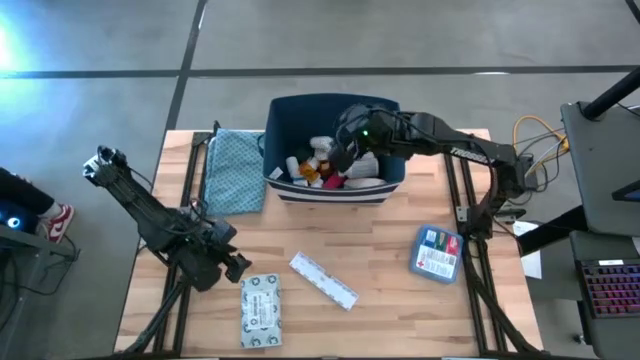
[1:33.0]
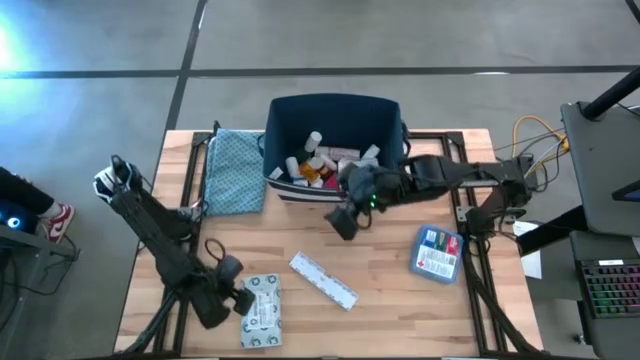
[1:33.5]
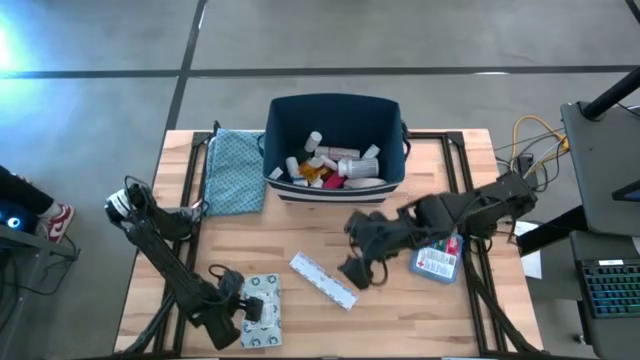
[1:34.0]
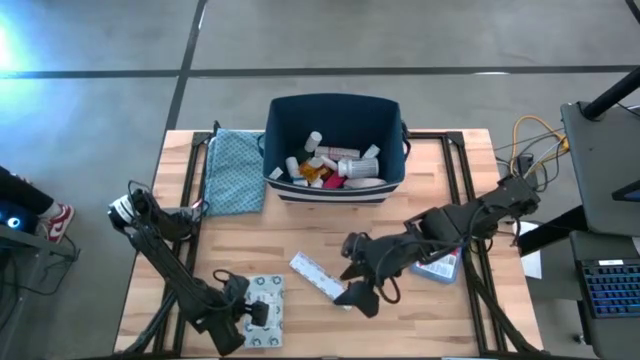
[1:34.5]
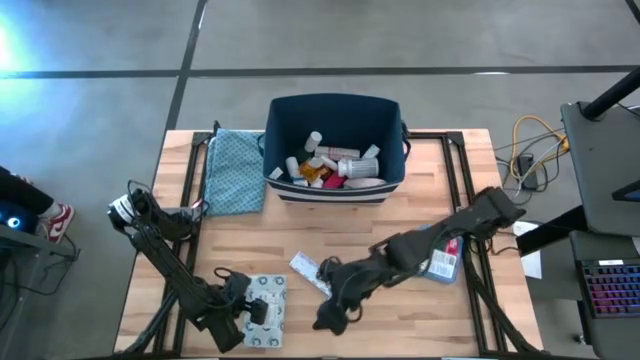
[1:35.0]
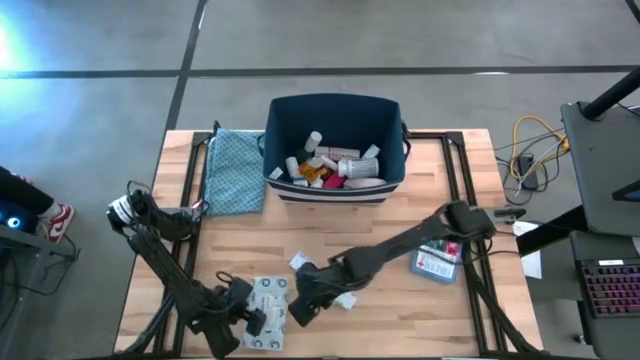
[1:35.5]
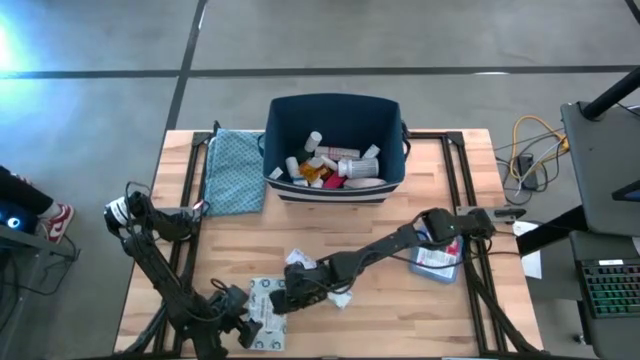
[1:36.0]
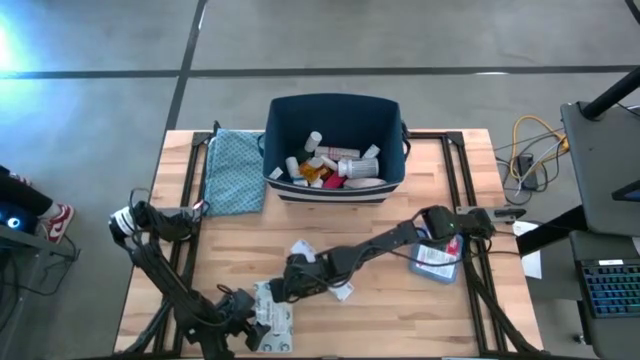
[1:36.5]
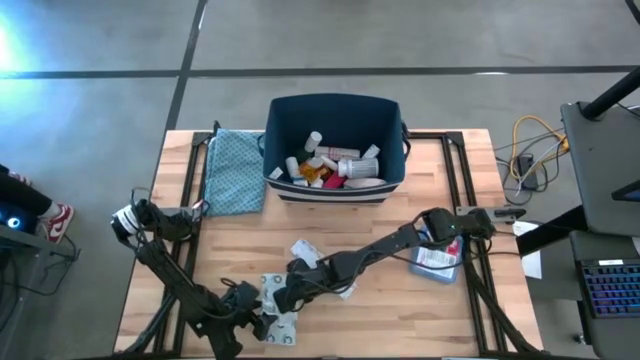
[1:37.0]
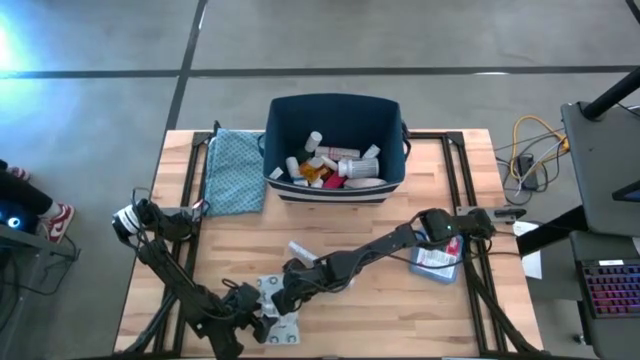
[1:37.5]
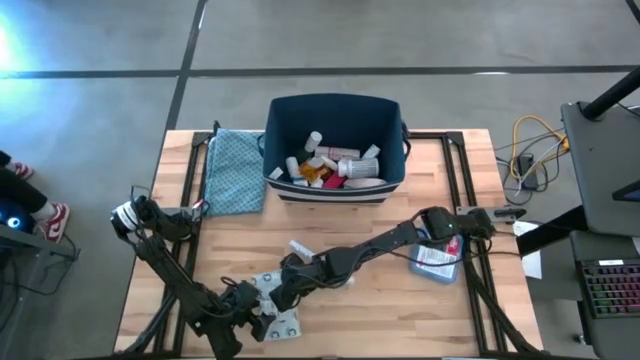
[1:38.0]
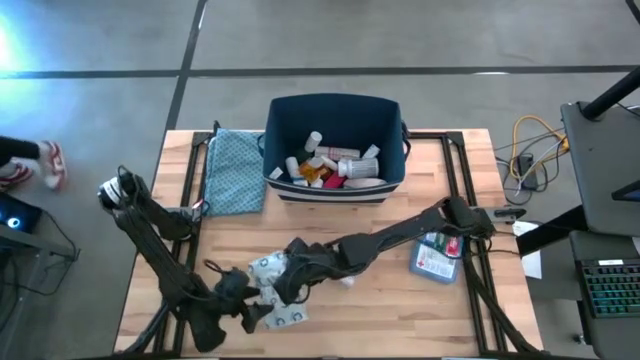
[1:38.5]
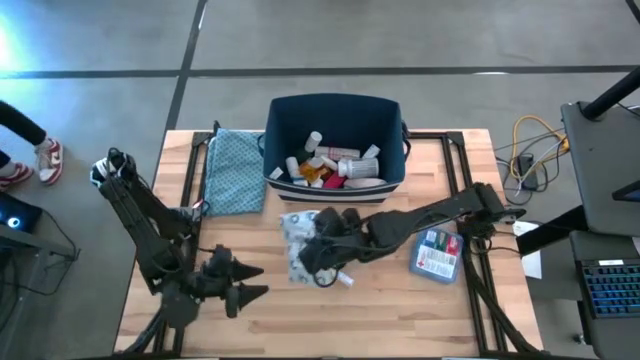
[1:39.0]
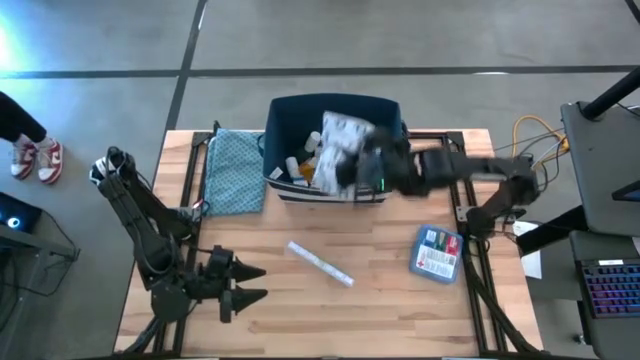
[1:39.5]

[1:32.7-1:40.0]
Task: Pick & place medical supplies in basket/bin
Put the mailer bag into the bin

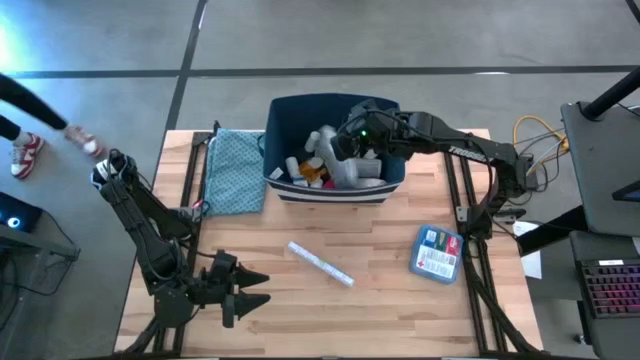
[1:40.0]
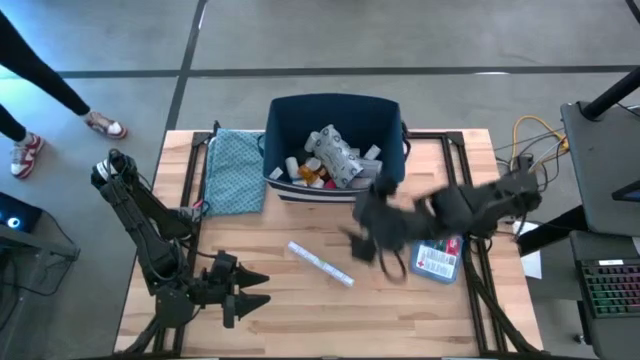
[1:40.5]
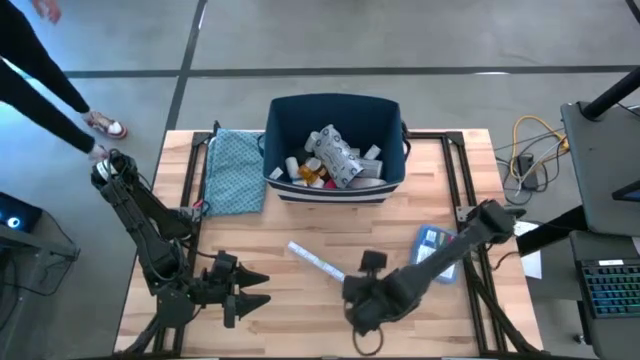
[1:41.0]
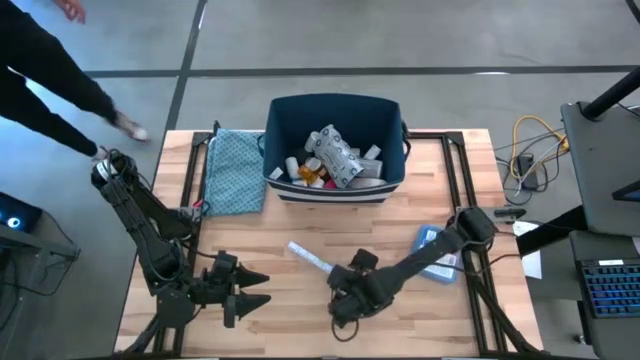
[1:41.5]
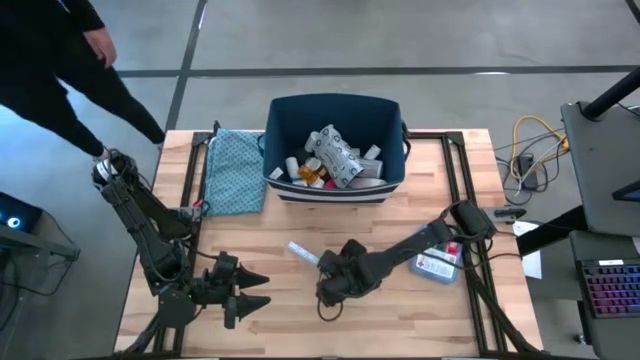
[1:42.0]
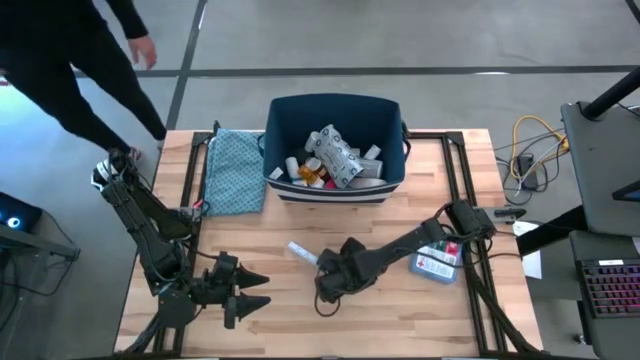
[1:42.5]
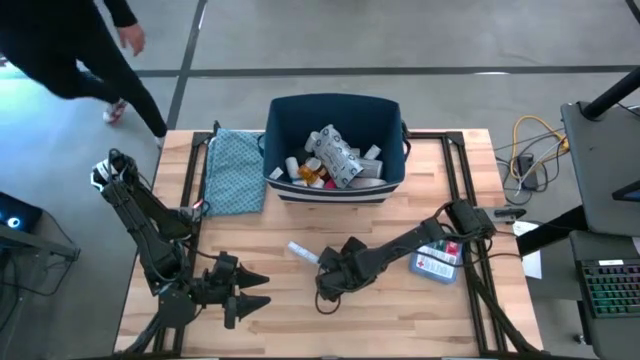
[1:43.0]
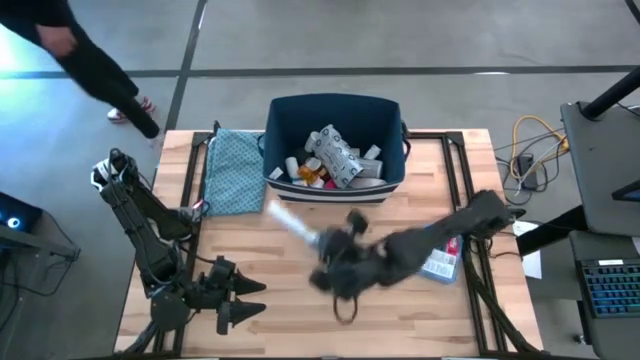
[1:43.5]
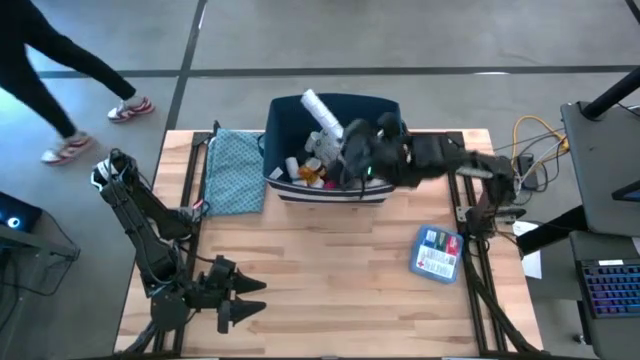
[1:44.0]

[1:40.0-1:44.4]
Put the medicine organizer into the bin

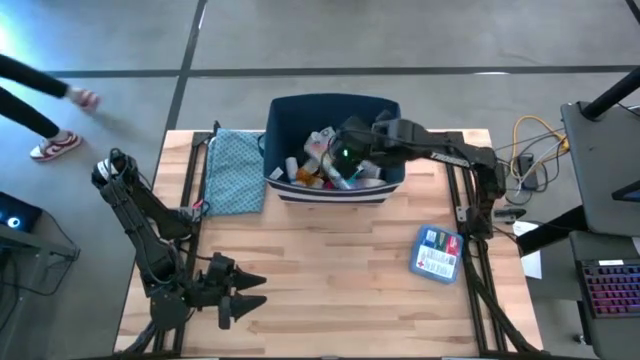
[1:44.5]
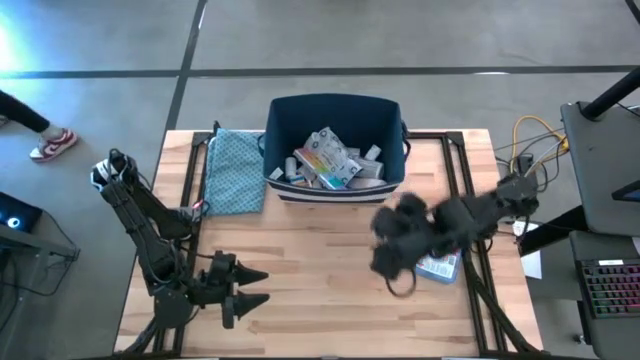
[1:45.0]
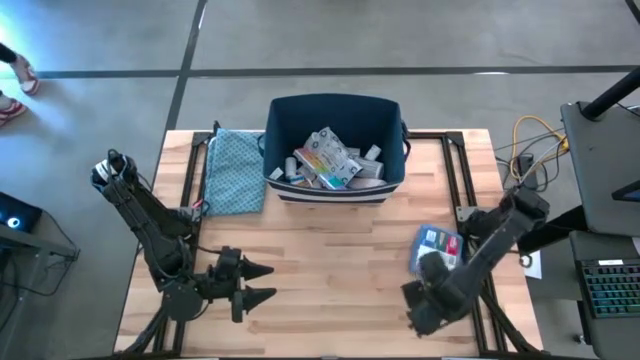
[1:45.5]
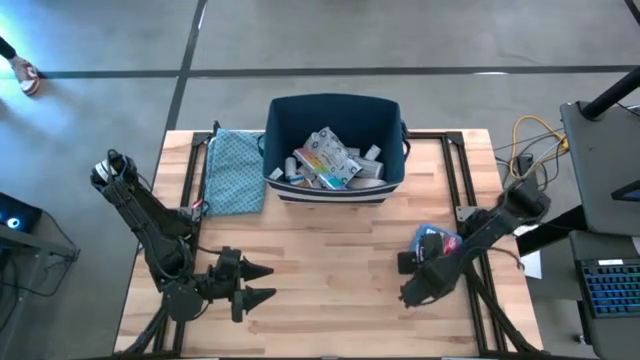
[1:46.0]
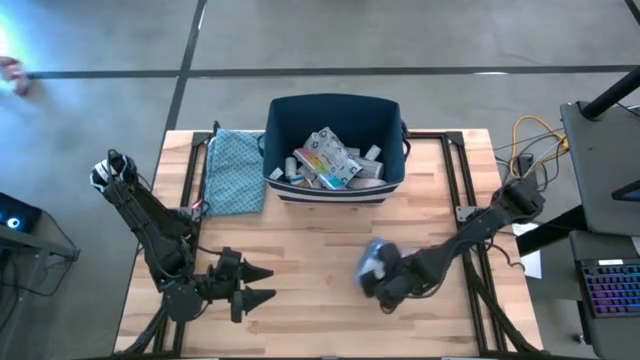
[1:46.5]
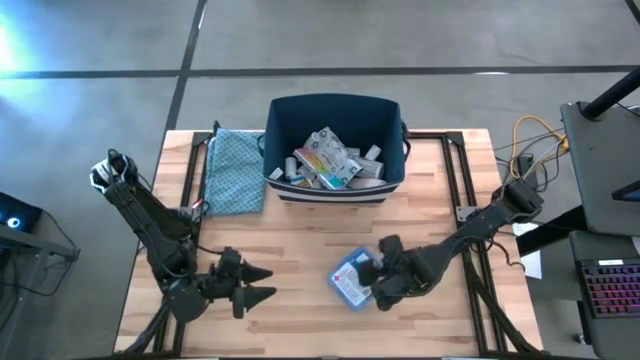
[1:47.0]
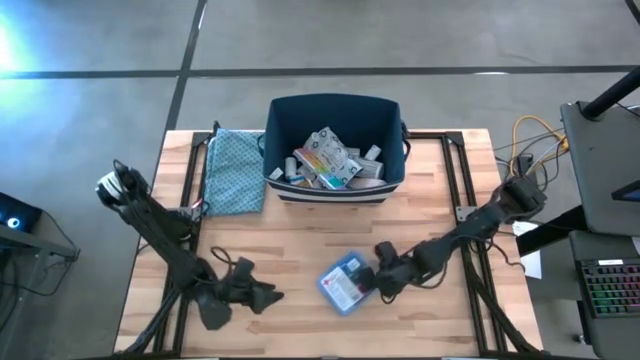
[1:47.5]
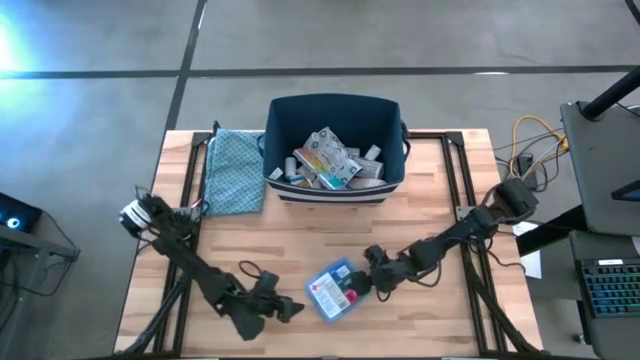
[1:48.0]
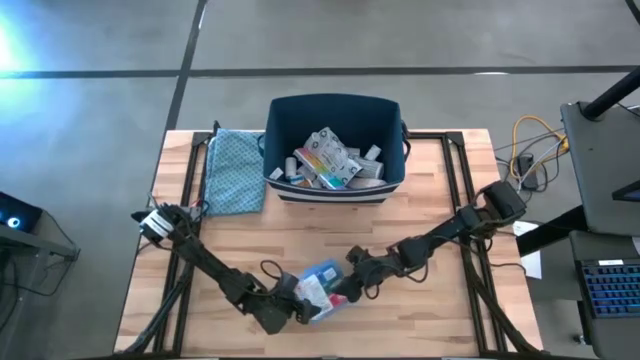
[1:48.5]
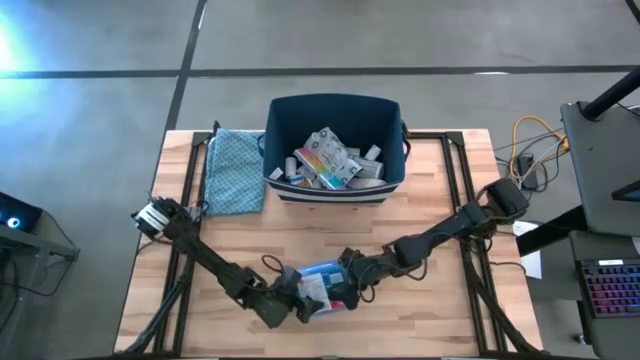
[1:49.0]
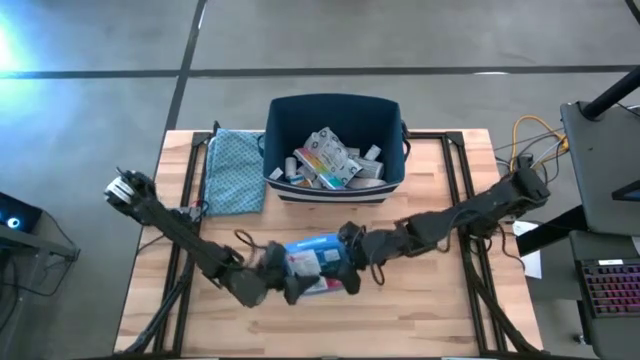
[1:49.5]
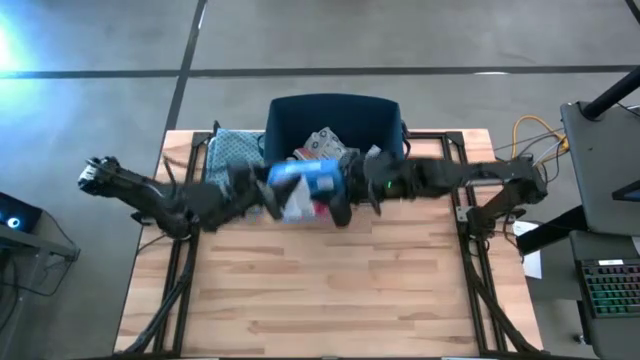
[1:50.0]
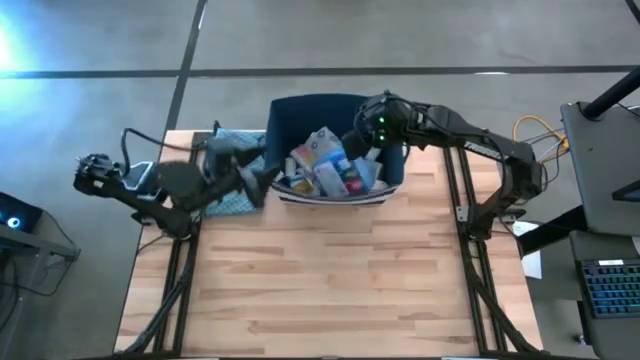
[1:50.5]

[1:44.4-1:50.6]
Put the blue first aid kit into the bin

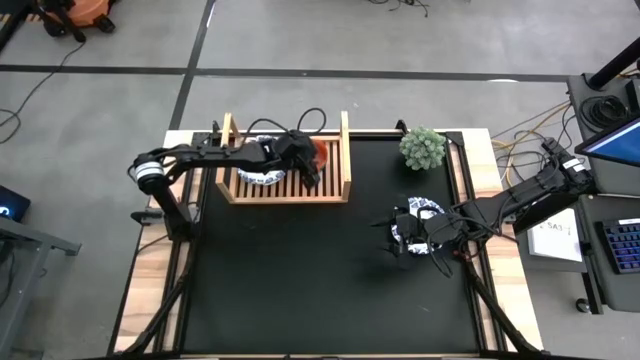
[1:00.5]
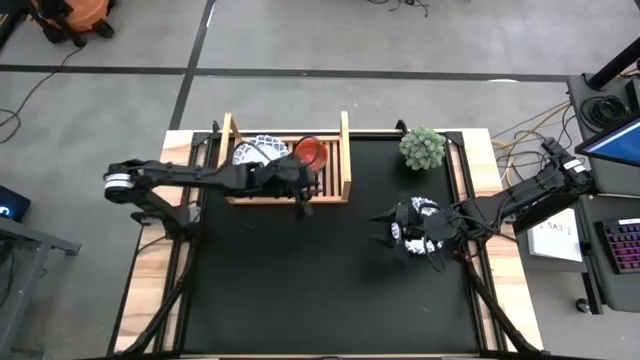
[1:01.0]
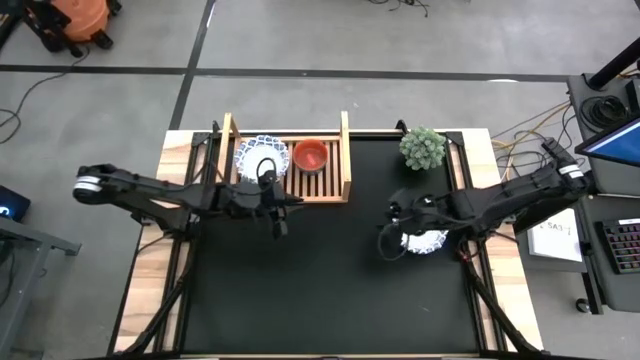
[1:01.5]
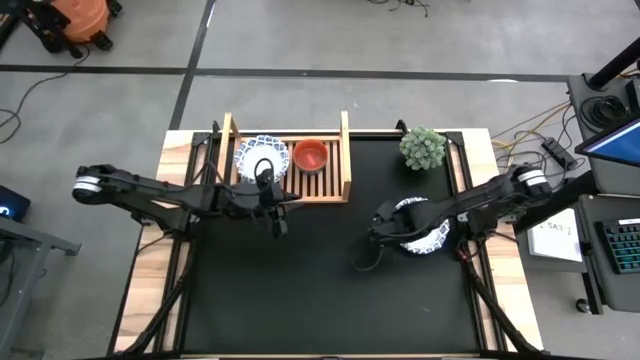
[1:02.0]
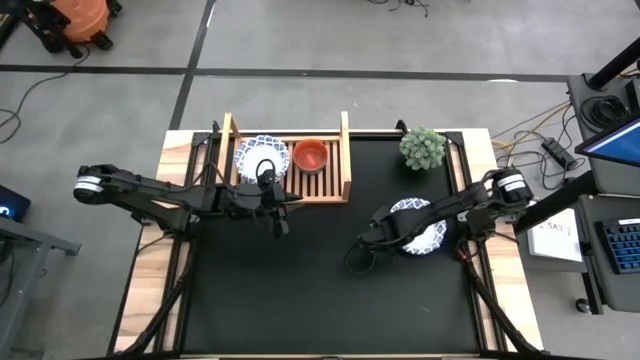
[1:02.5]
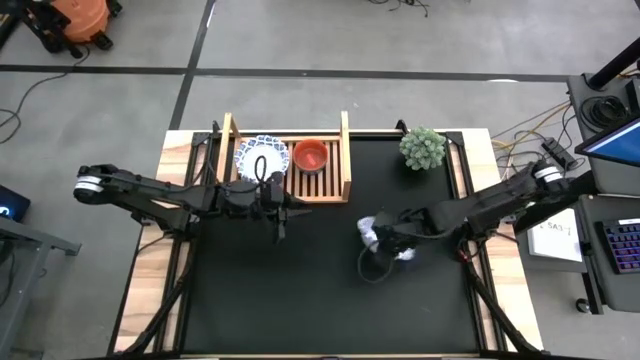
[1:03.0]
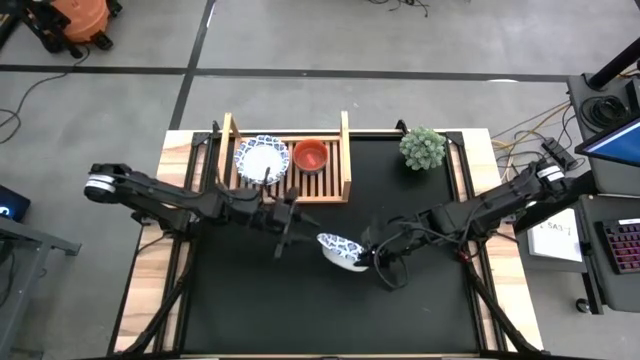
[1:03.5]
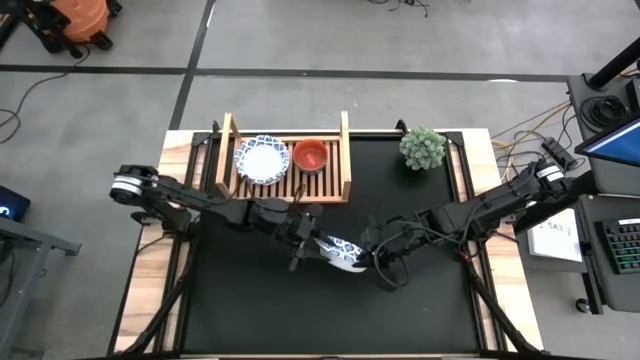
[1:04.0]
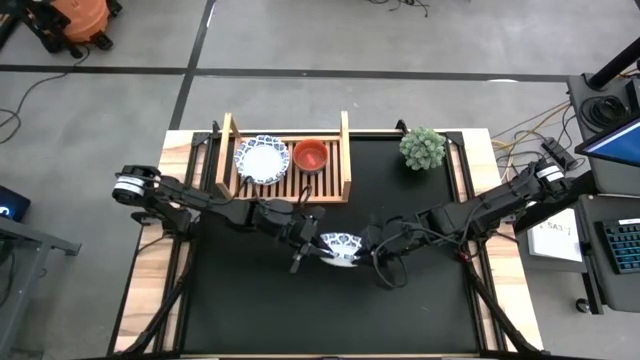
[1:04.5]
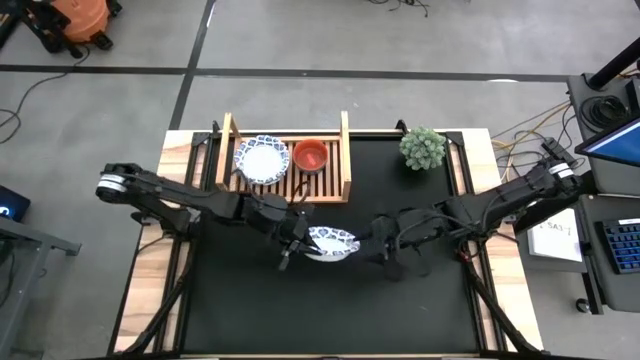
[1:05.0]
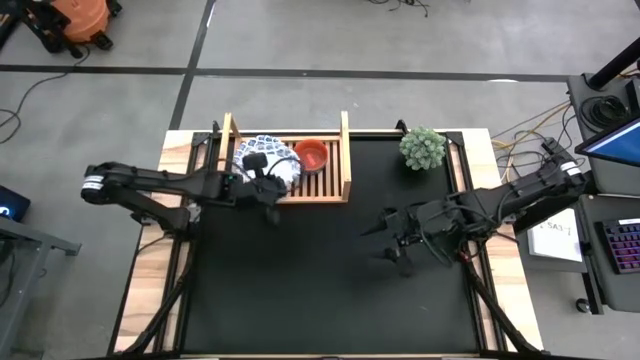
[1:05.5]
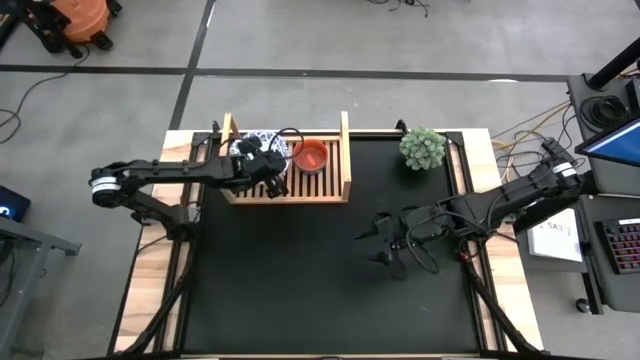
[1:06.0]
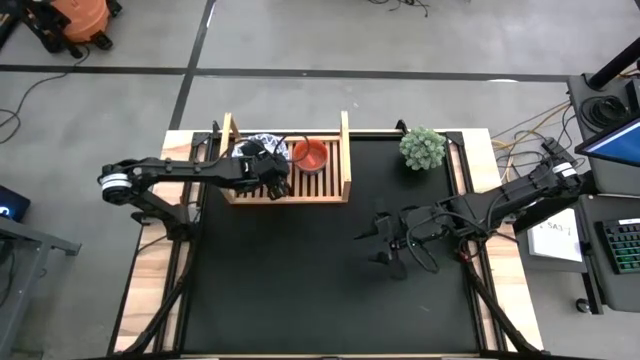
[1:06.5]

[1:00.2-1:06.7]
Task: Place and stack bowls onto a shelf
Stack the blue patterned bowl on top of the blue patterned bowl on the shelf
